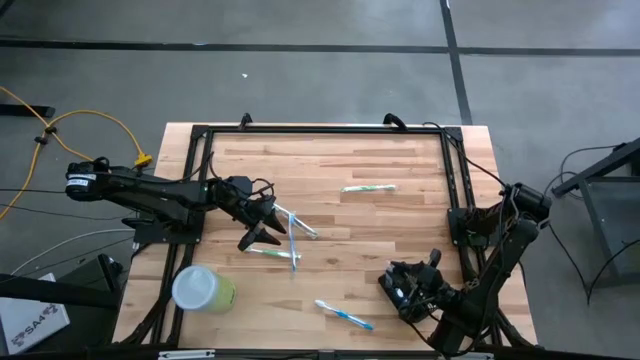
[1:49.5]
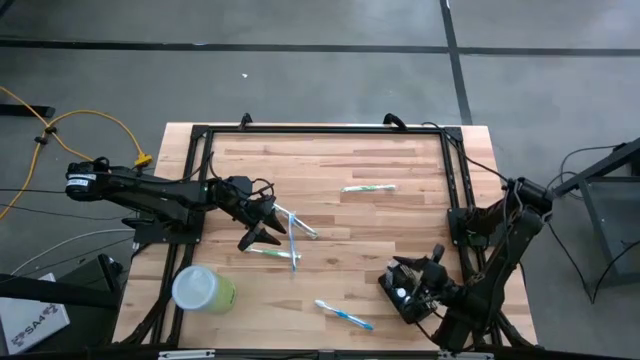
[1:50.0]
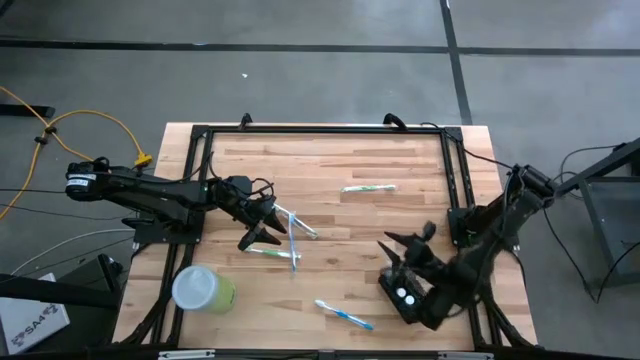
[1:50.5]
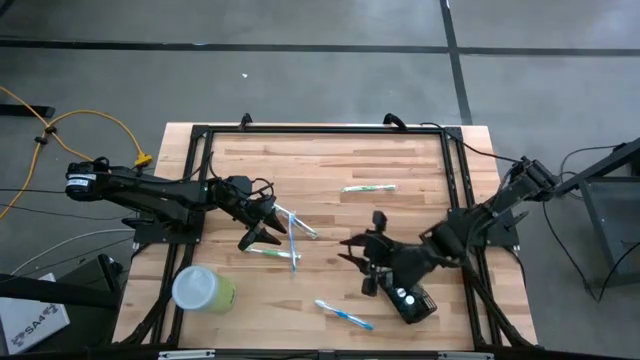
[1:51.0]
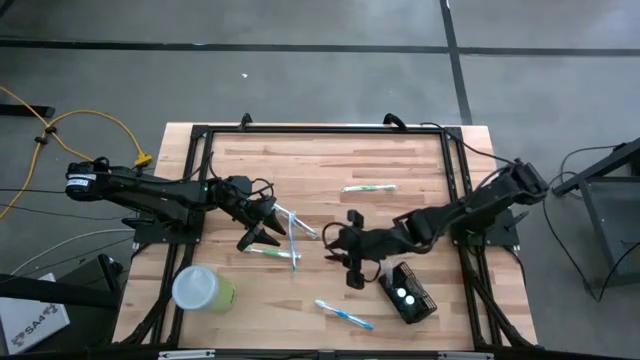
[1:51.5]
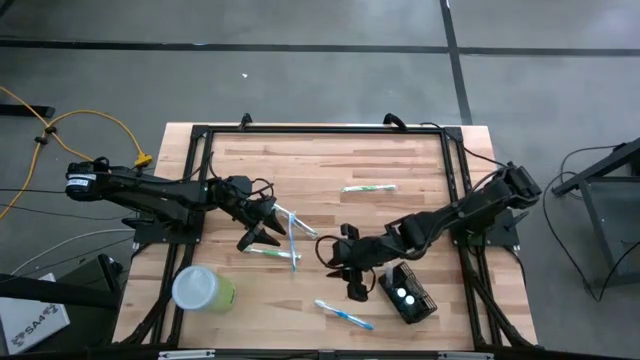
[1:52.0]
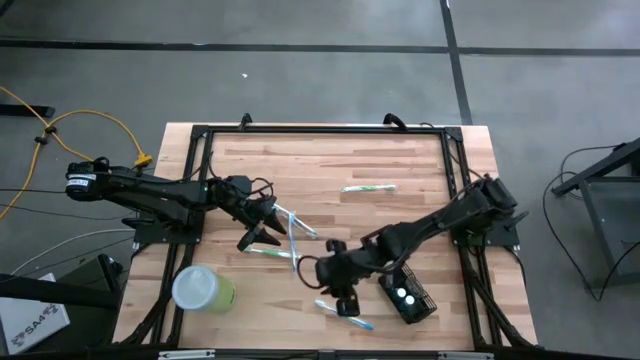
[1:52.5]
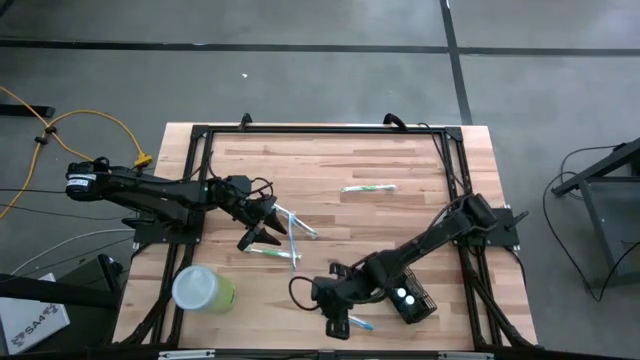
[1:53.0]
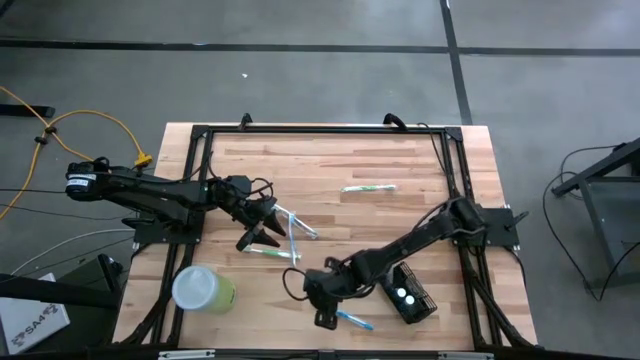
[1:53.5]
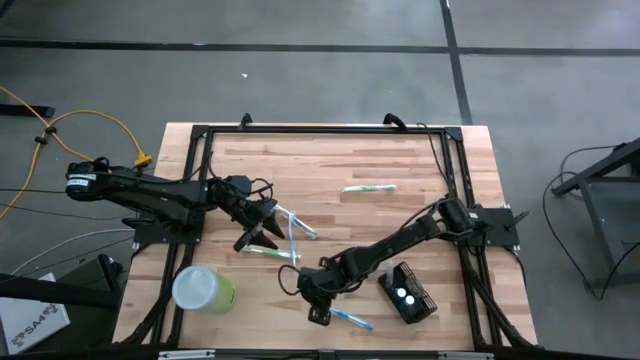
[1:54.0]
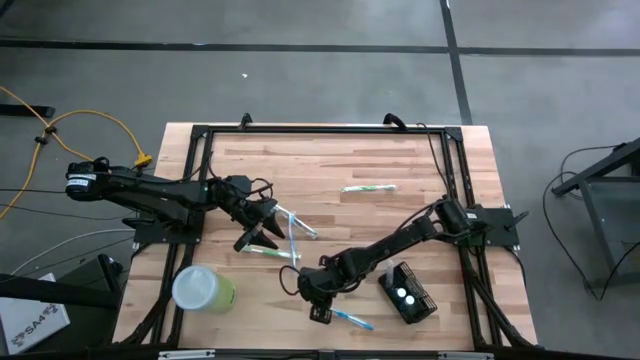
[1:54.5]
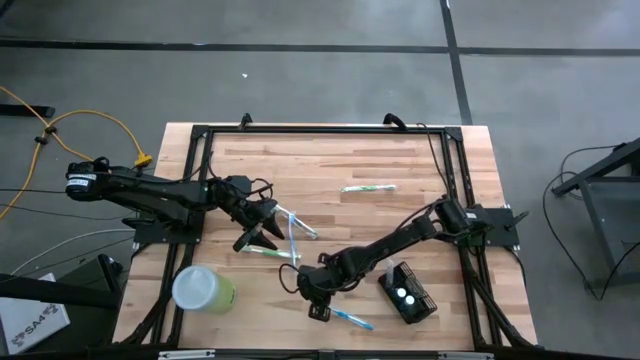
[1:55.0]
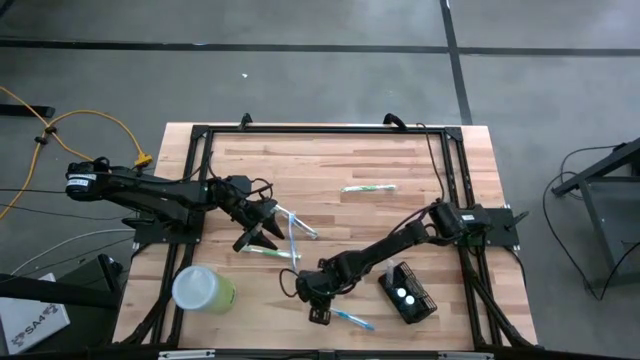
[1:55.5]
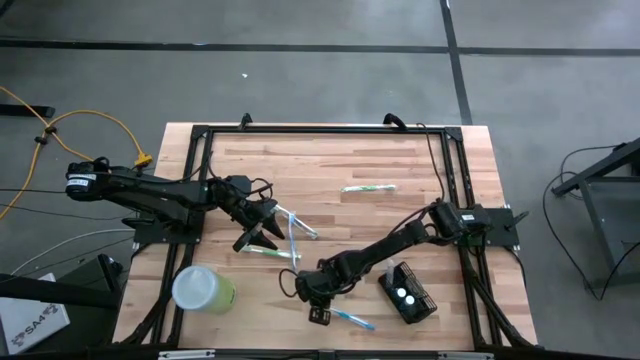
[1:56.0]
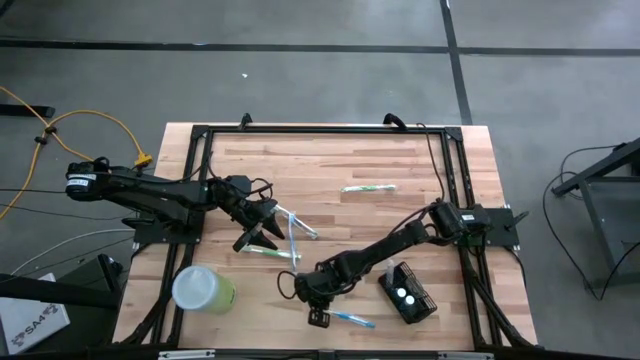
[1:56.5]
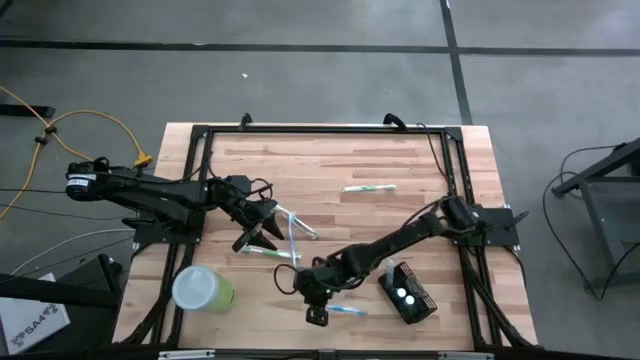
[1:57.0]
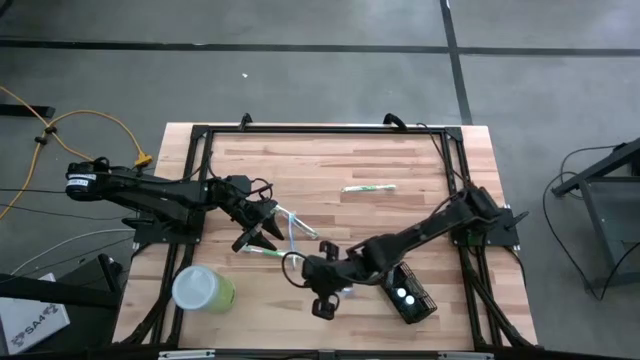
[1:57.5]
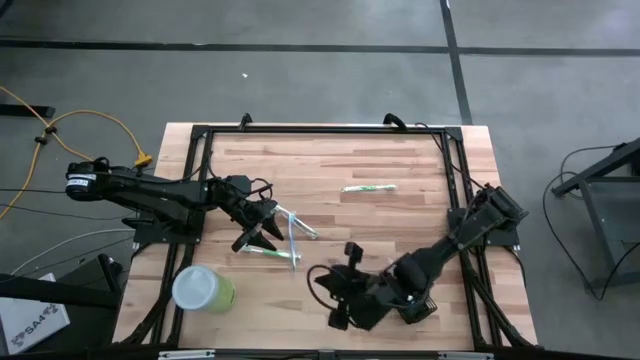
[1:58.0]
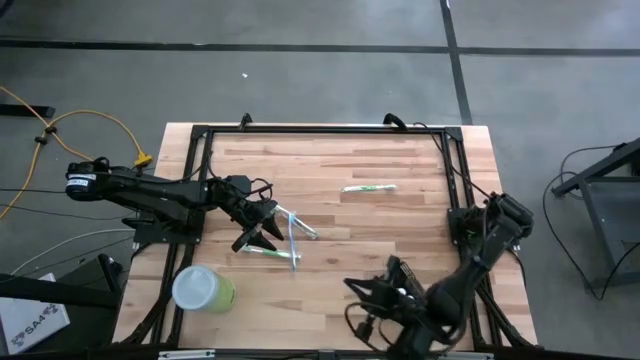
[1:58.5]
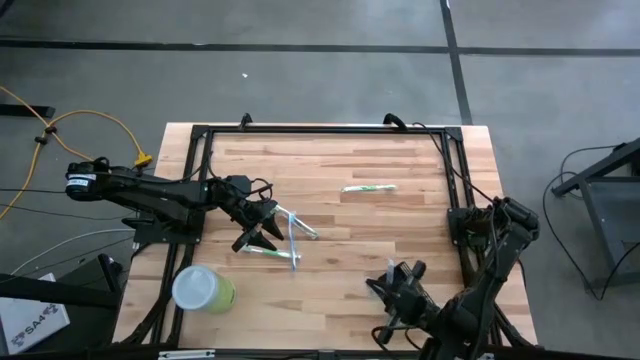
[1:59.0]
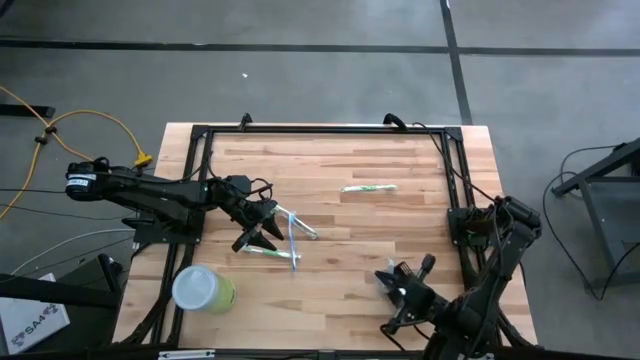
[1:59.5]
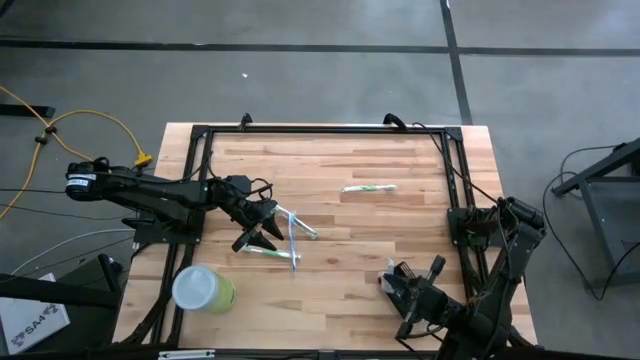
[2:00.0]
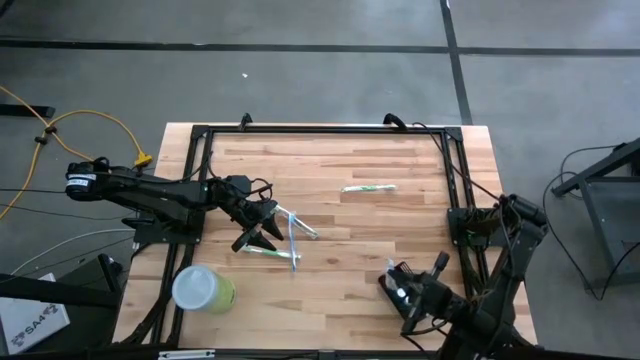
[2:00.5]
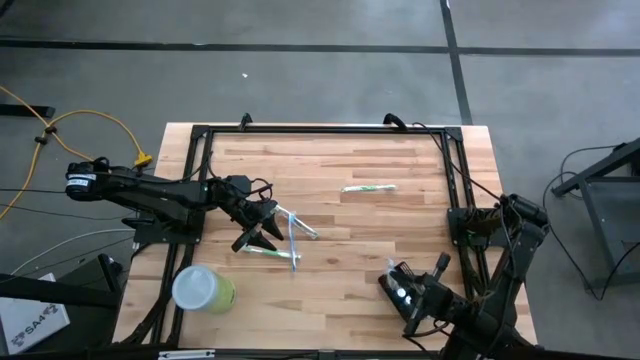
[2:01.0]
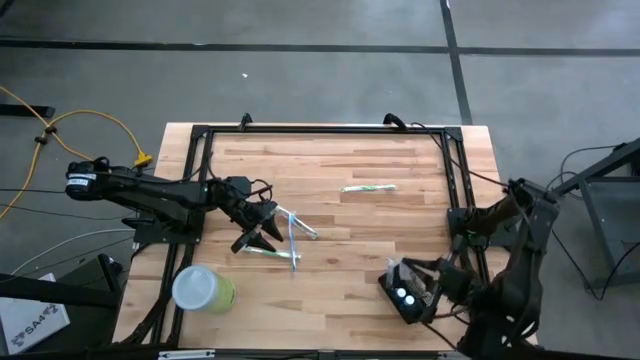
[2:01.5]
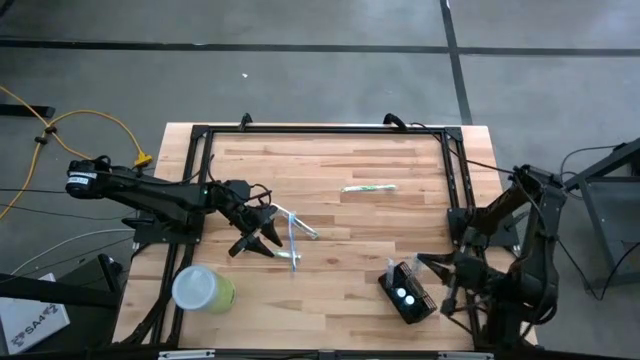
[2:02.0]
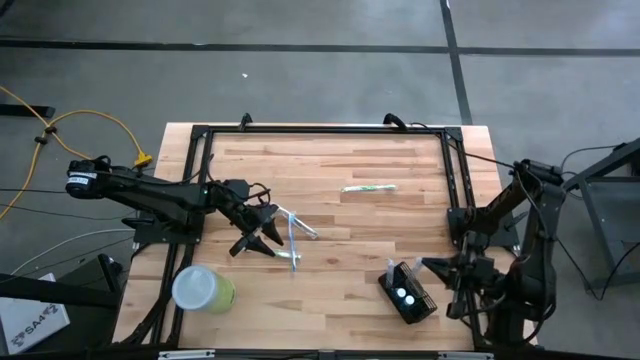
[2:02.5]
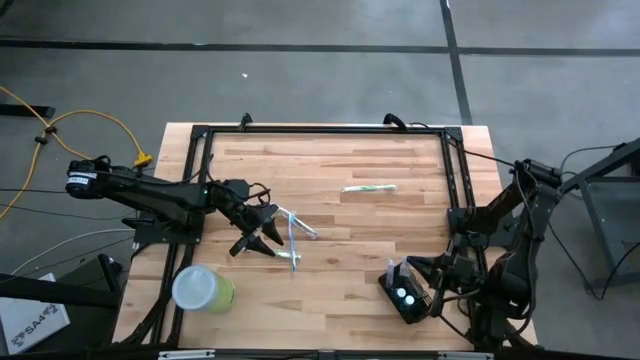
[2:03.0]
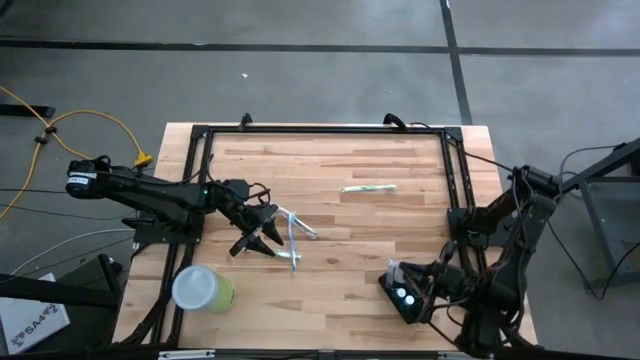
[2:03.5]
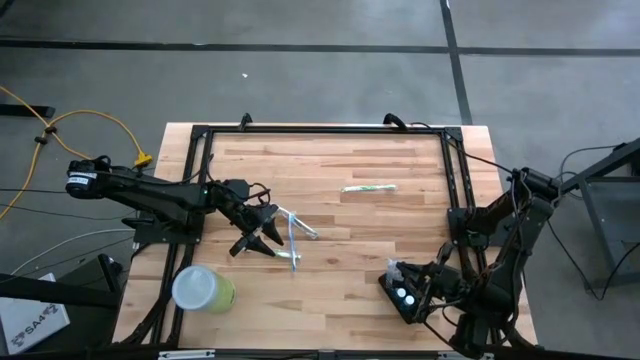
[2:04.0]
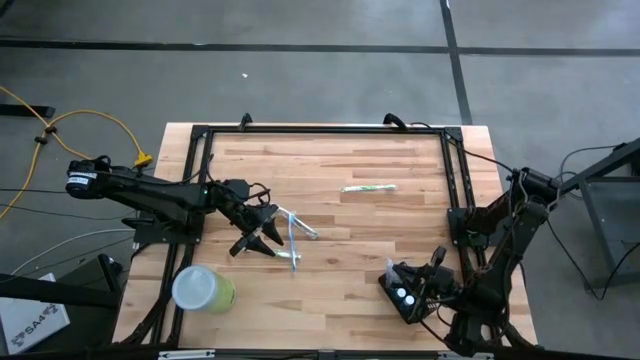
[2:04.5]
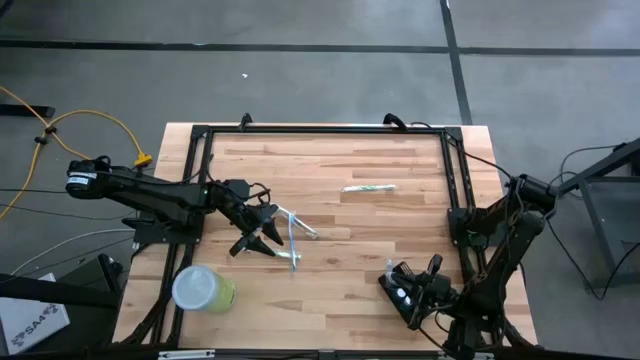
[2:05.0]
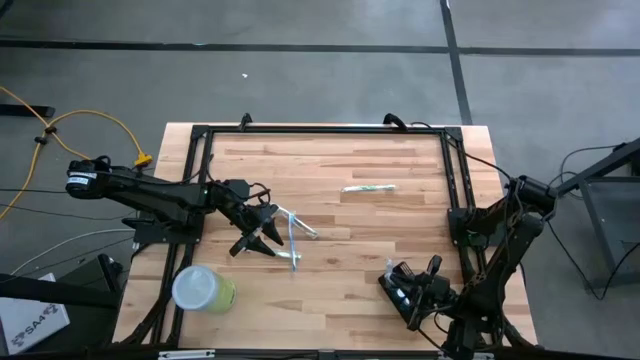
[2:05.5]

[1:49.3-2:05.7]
Task: Pick & Place toothbrushing station
Put the bottom blue toothbrush into the top of the black wire organizer

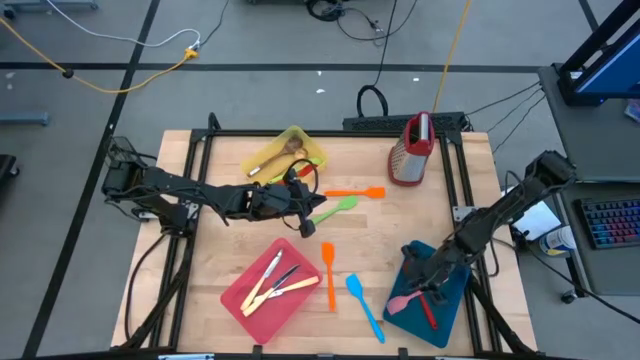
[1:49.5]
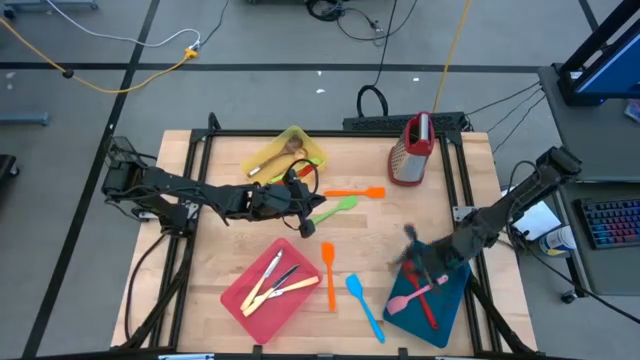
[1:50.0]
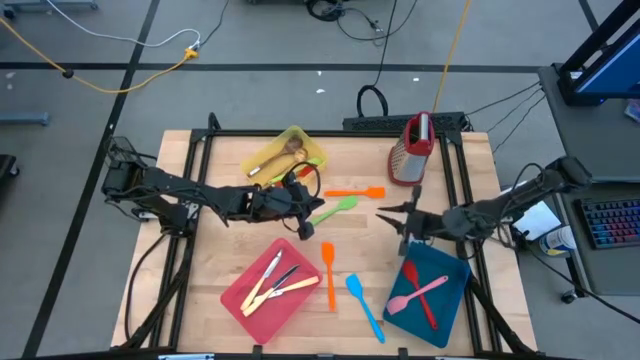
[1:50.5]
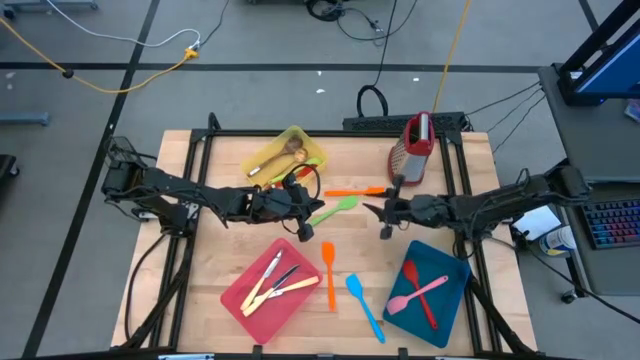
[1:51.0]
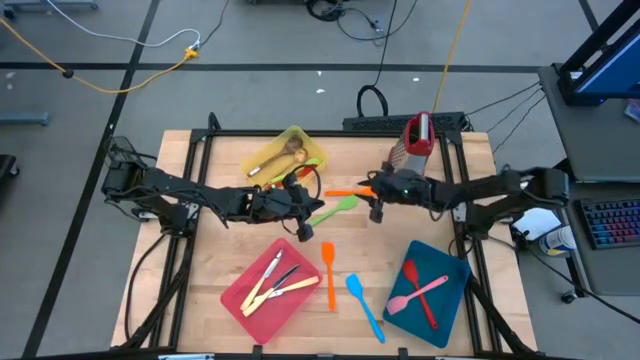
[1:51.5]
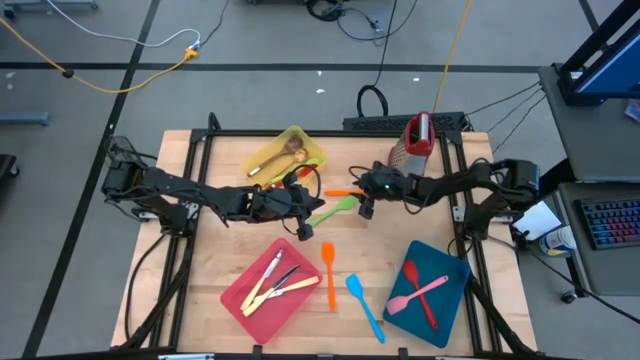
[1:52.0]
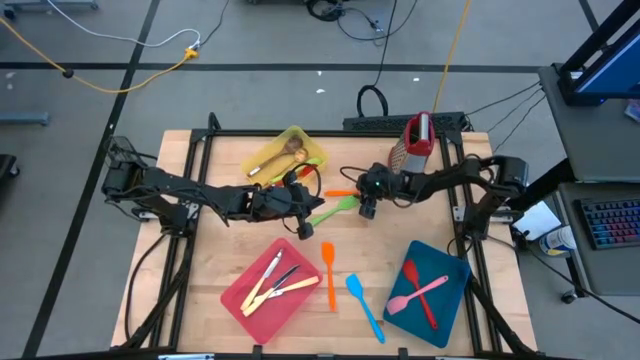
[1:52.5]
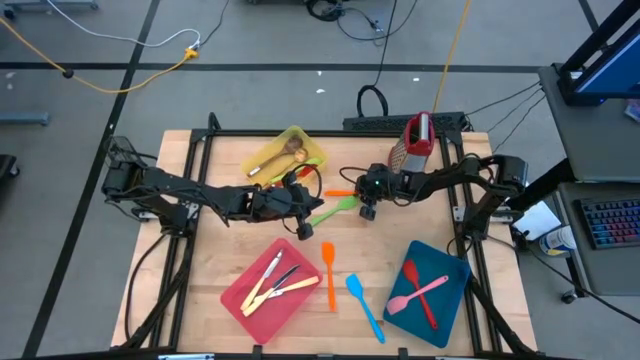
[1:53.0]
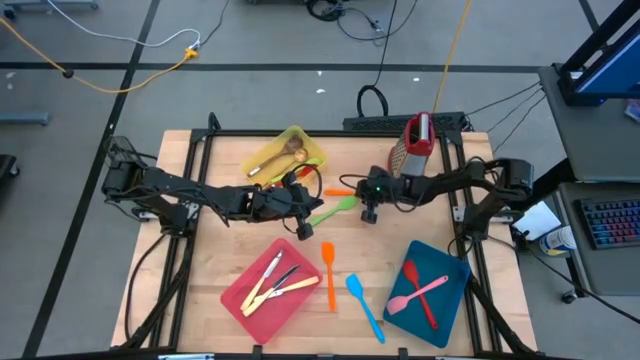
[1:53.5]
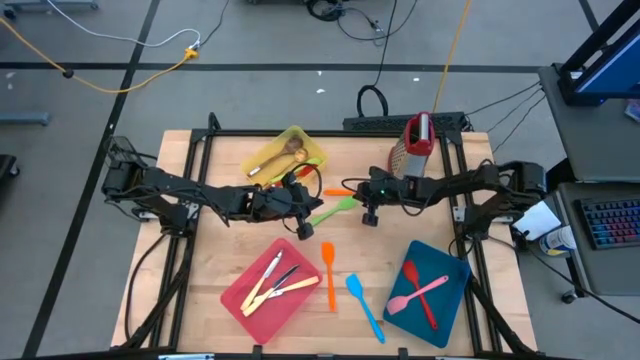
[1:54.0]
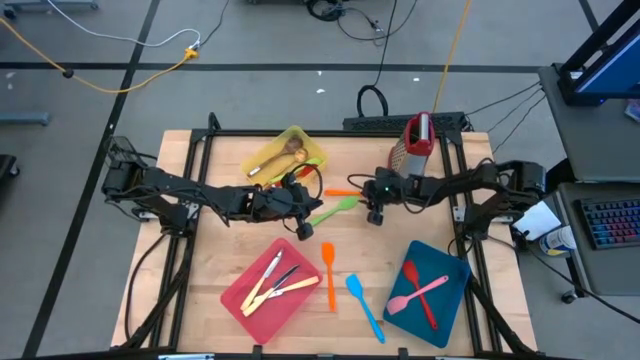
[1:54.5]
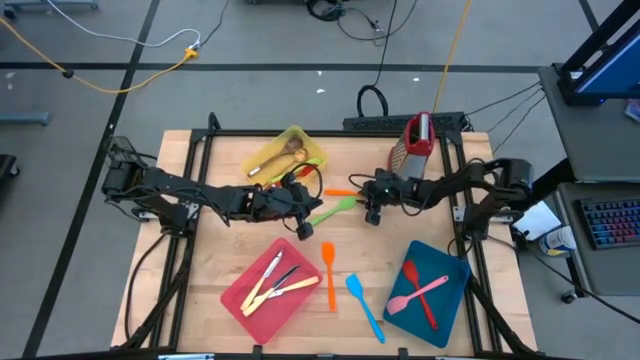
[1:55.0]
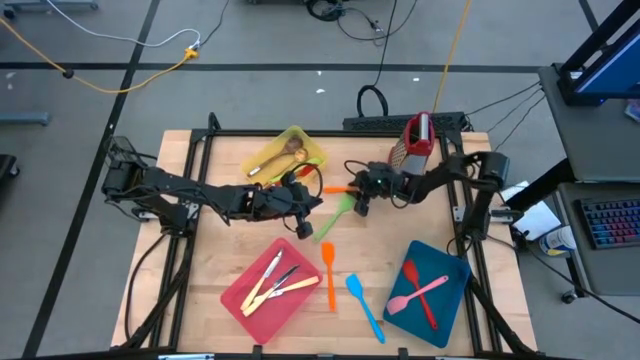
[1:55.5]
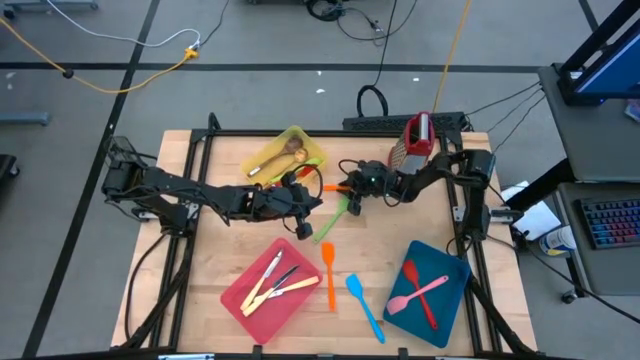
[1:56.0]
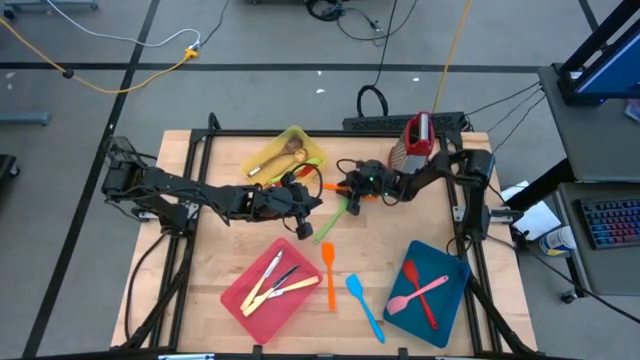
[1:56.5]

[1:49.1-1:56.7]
Task: Pick & Place Kitchen Items
Put the orange spatula into the blue bin
